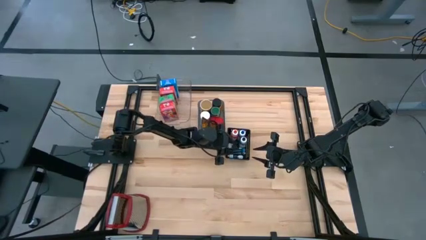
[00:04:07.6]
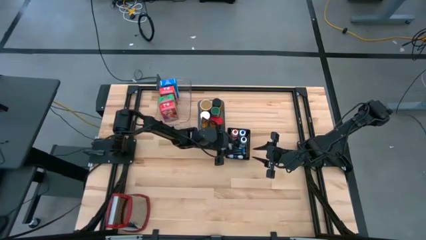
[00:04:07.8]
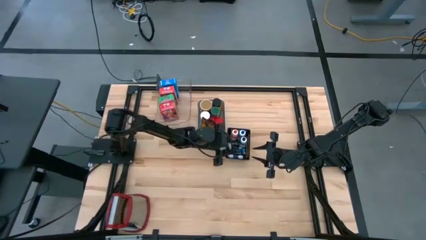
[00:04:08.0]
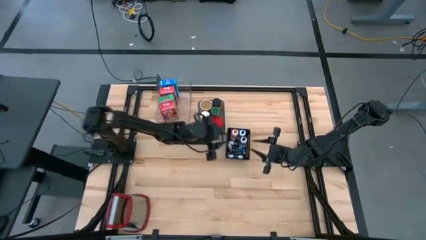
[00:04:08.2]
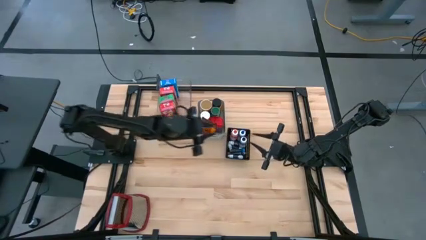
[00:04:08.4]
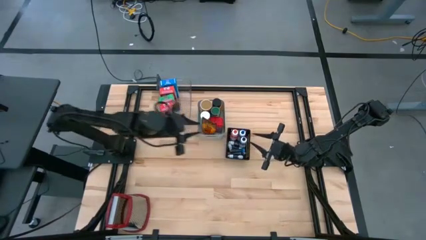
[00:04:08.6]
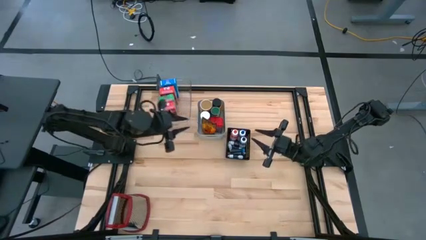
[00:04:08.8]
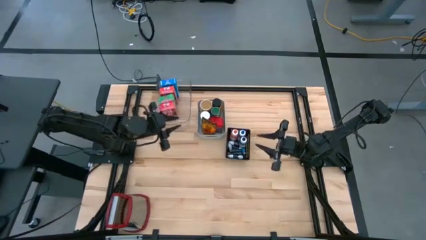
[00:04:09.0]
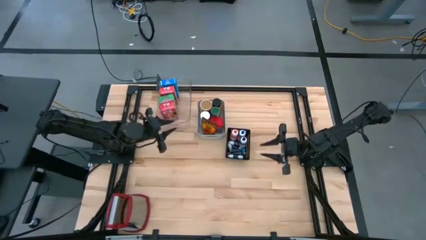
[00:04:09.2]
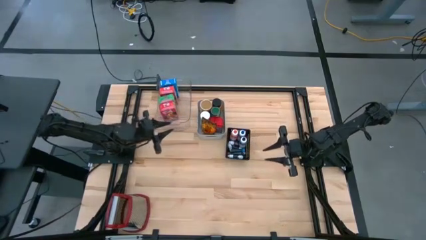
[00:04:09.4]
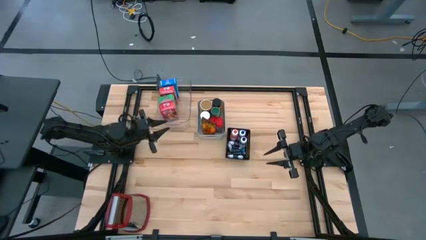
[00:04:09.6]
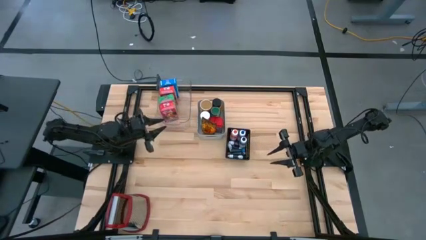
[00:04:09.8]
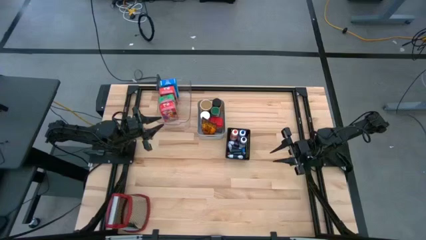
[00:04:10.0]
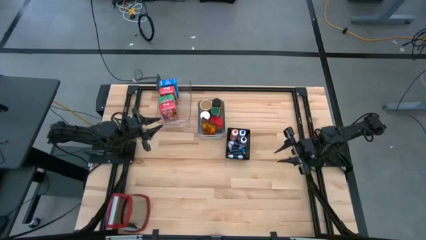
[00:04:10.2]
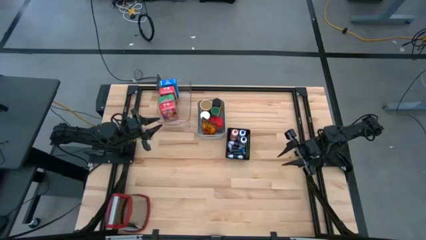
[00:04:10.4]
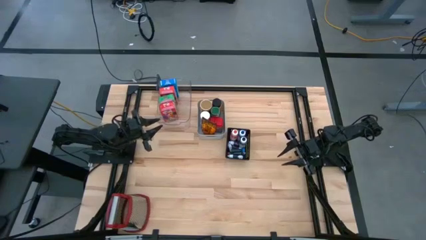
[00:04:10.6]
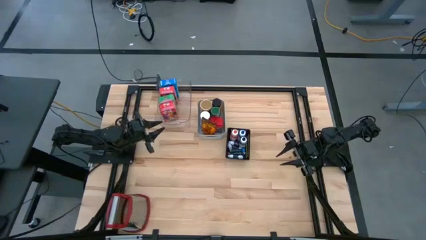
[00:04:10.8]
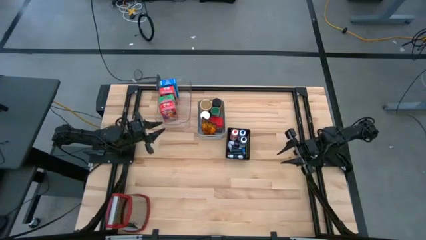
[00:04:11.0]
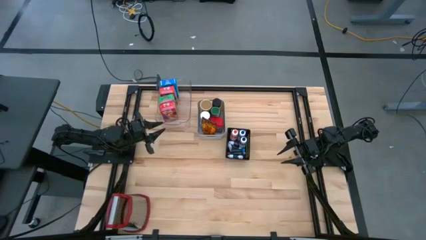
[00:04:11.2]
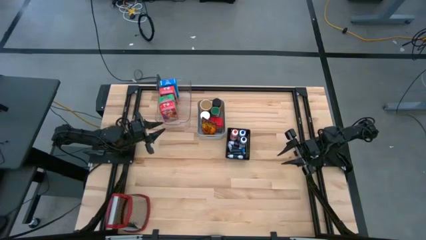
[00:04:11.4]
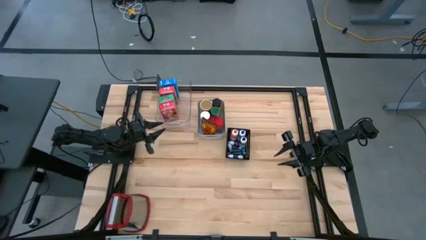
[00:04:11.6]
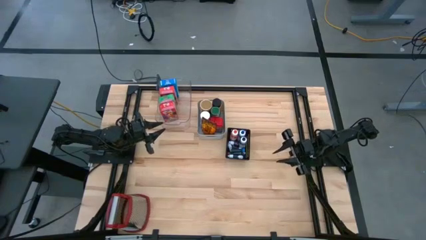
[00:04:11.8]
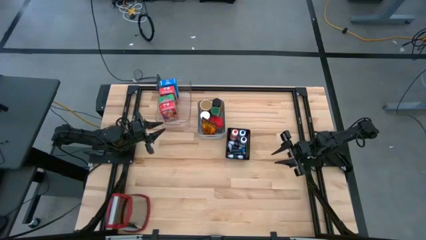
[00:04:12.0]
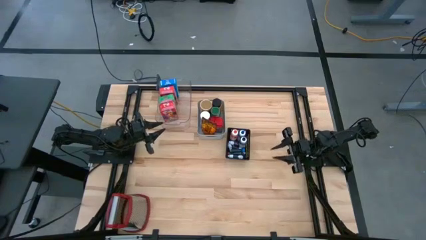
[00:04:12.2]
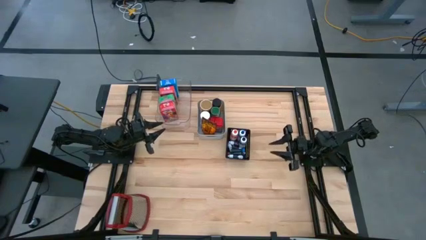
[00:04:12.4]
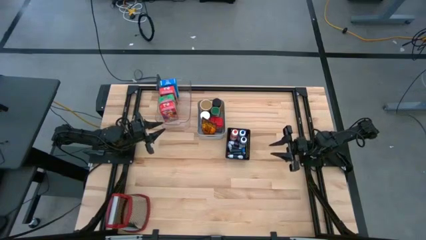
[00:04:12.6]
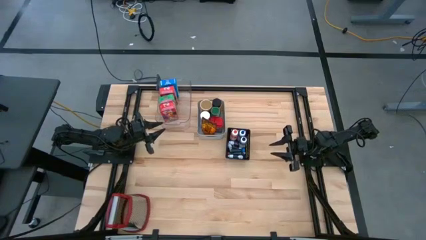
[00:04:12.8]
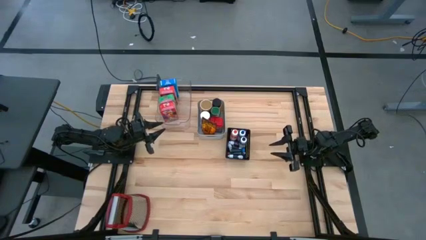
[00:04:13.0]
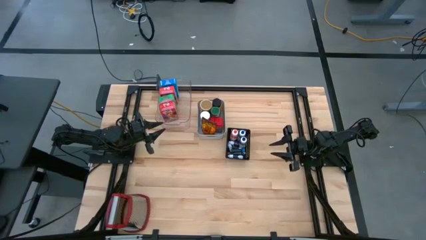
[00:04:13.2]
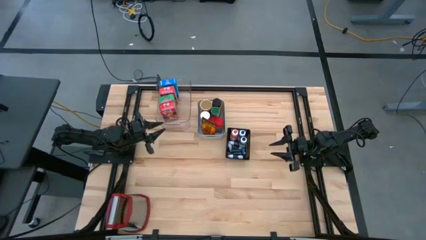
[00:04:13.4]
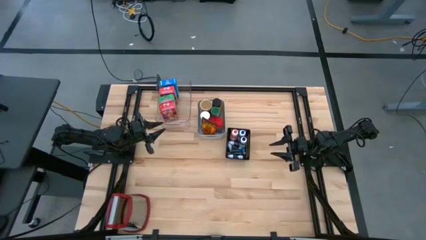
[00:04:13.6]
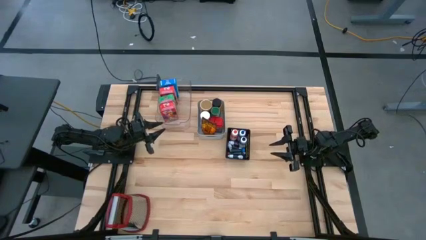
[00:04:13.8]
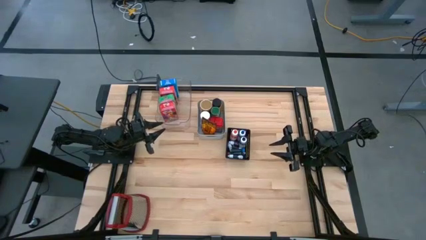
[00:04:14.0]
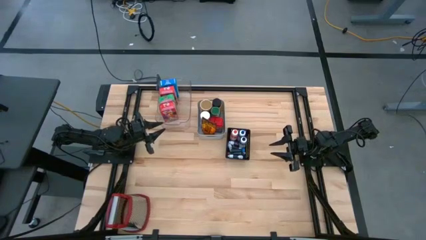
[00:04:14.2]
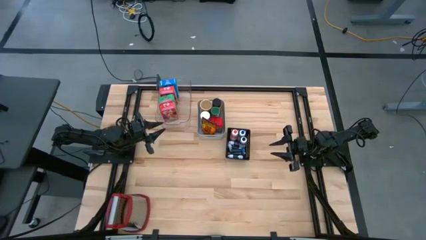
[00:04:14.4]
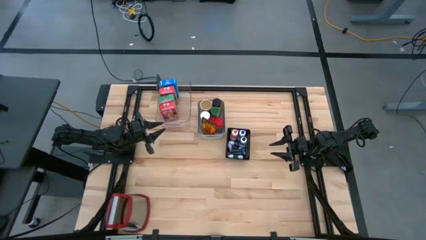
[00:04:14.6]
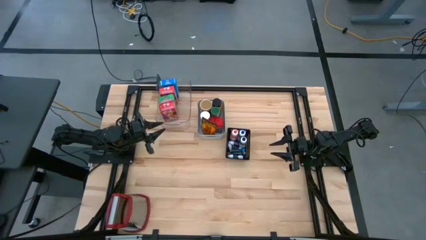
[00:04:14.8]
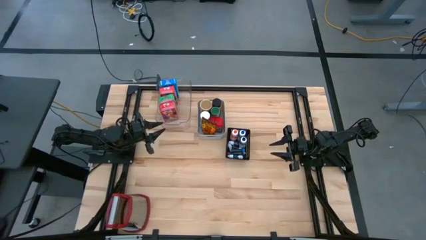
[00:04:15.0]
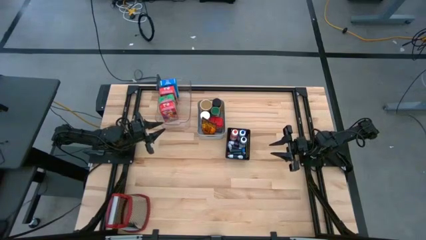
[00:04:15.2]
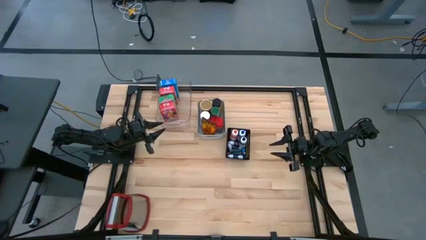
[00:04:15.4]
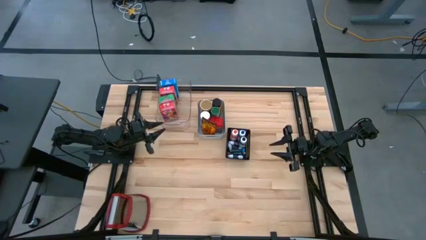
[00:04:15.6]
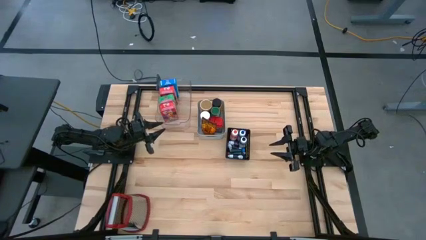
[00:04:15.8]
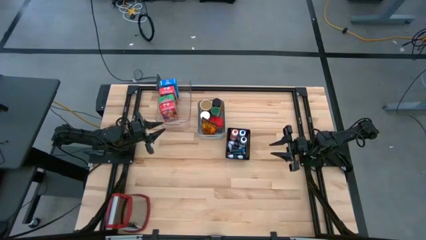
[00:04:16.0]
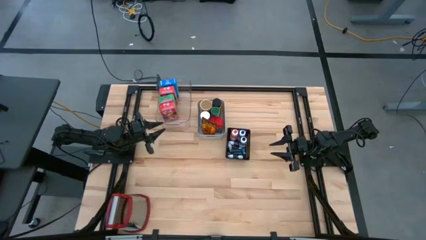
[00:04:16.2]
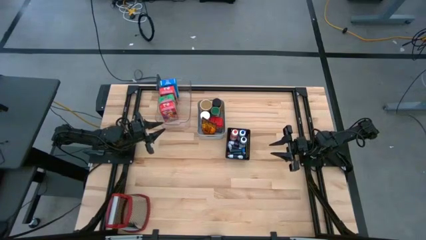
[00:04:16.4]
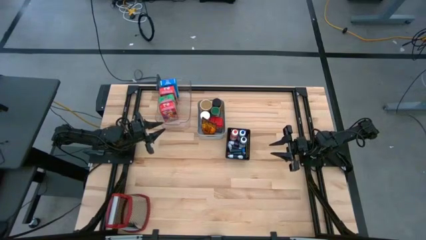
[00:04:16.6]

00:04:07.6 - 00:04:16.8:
Task: Pick & Place Kitchen Items
Return to Home Position

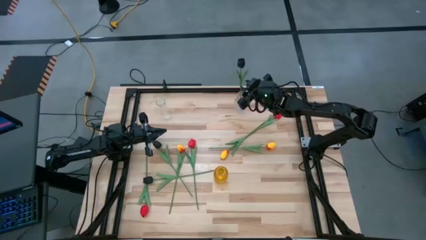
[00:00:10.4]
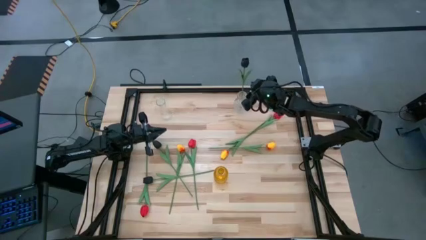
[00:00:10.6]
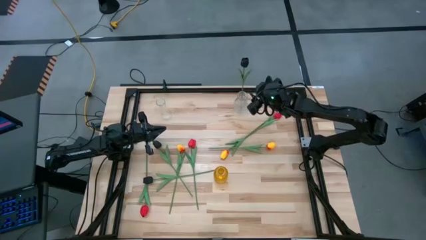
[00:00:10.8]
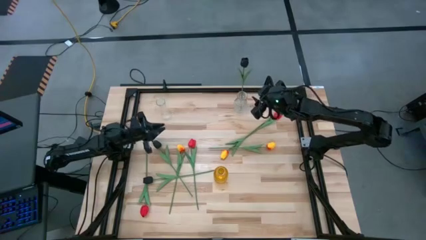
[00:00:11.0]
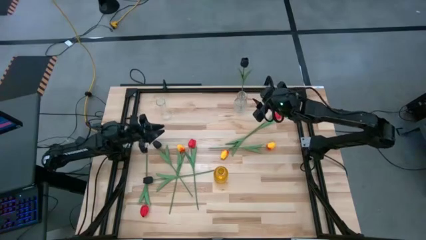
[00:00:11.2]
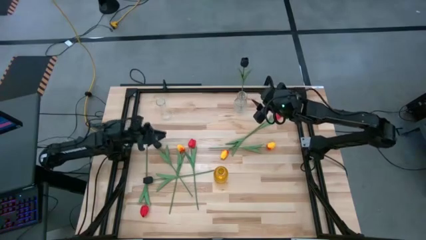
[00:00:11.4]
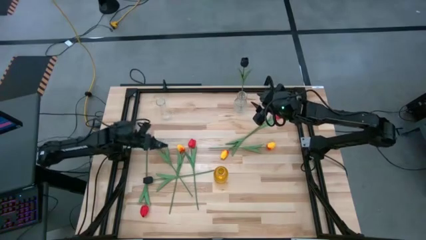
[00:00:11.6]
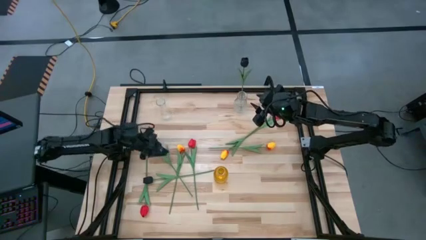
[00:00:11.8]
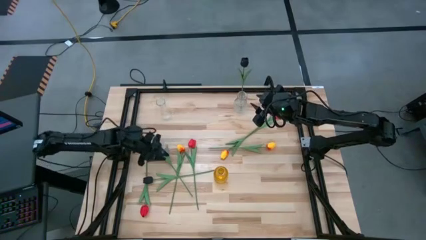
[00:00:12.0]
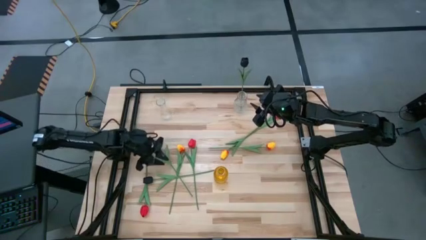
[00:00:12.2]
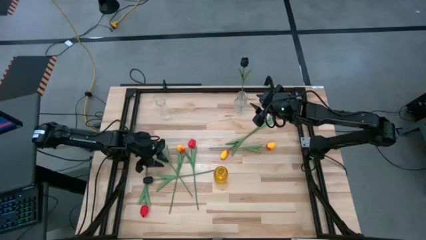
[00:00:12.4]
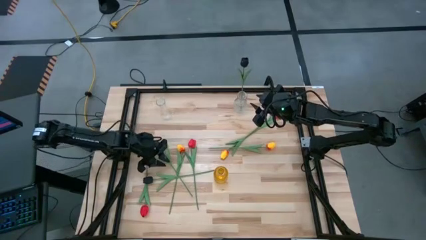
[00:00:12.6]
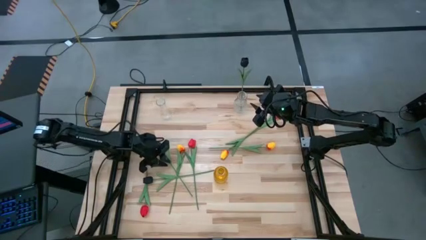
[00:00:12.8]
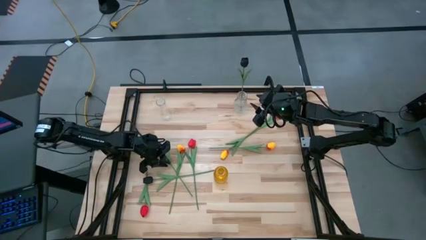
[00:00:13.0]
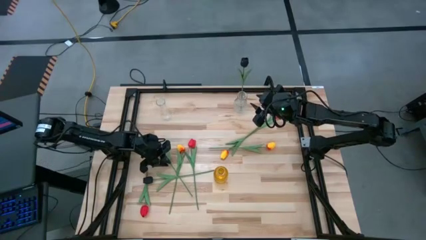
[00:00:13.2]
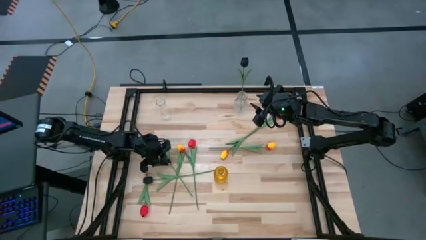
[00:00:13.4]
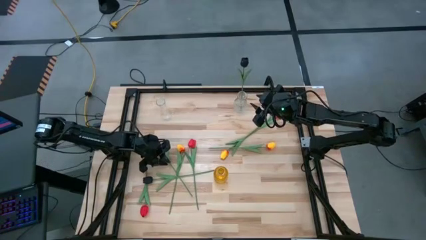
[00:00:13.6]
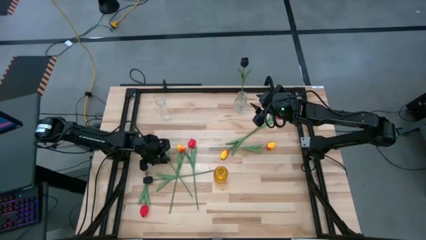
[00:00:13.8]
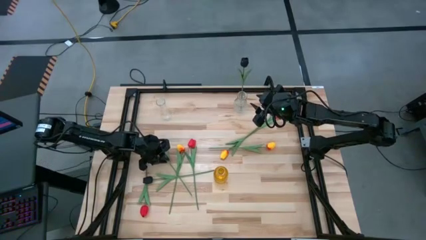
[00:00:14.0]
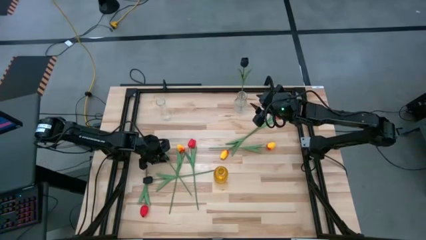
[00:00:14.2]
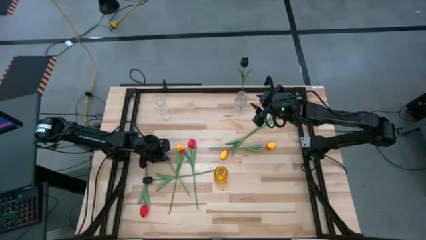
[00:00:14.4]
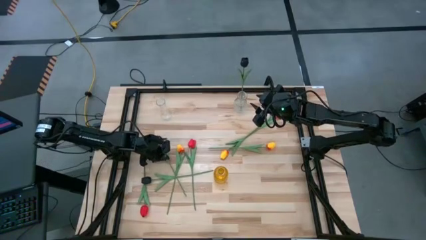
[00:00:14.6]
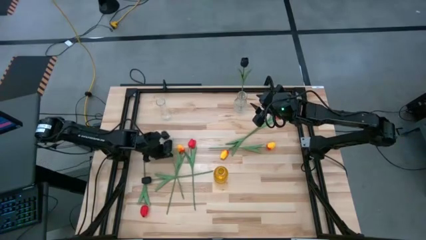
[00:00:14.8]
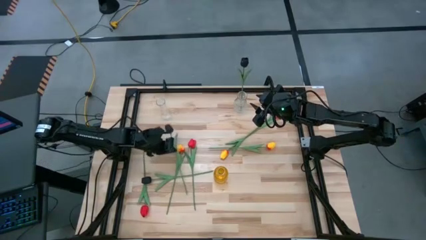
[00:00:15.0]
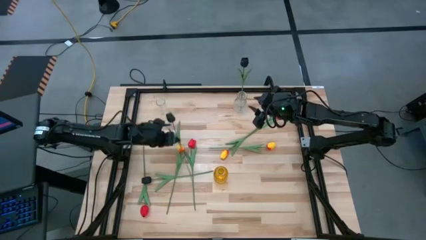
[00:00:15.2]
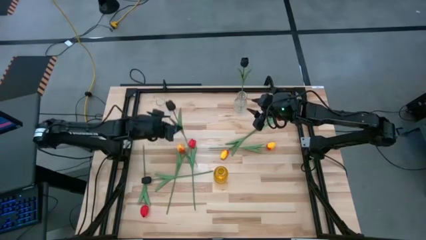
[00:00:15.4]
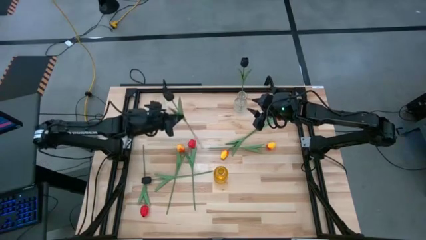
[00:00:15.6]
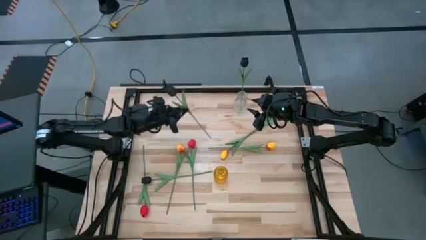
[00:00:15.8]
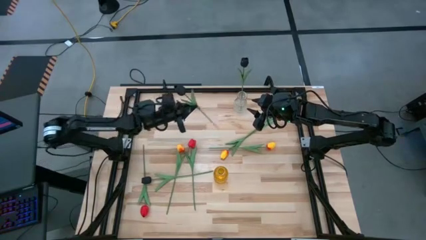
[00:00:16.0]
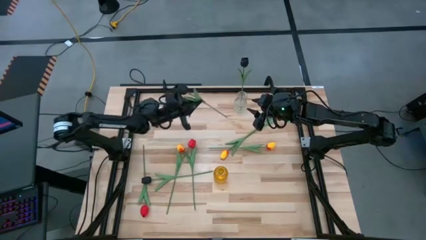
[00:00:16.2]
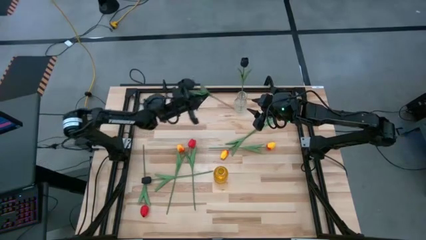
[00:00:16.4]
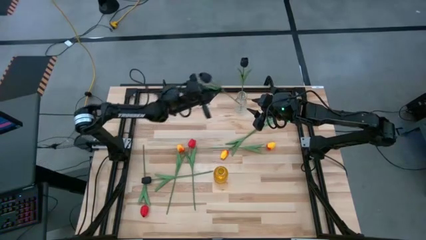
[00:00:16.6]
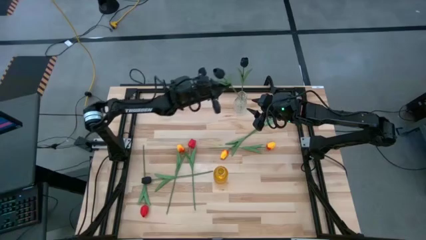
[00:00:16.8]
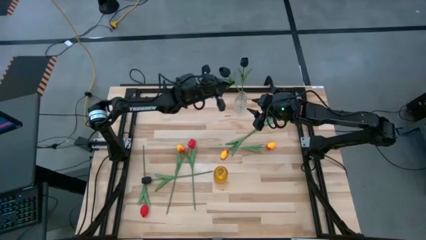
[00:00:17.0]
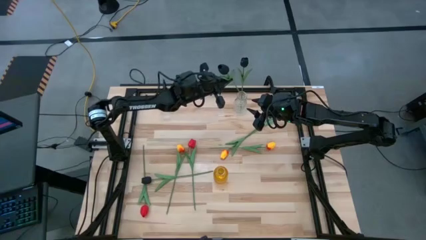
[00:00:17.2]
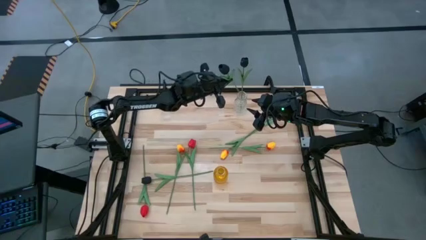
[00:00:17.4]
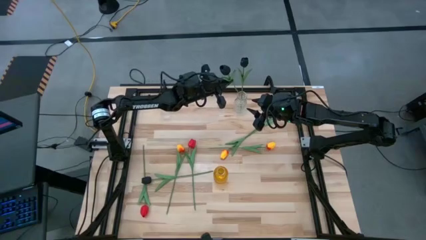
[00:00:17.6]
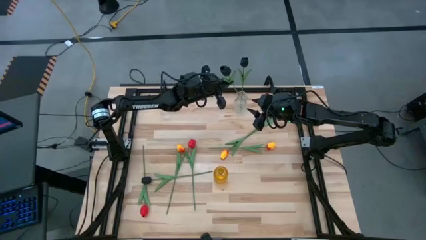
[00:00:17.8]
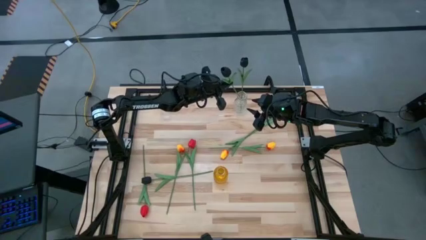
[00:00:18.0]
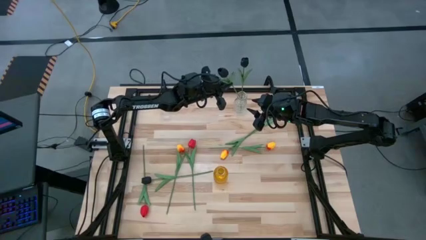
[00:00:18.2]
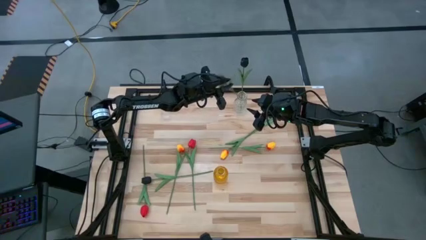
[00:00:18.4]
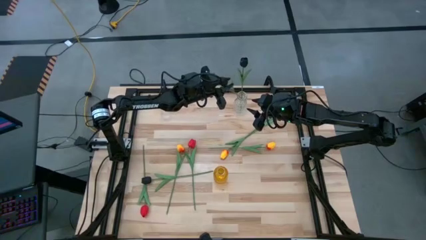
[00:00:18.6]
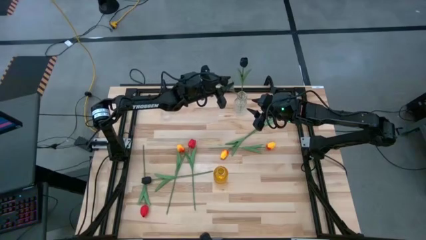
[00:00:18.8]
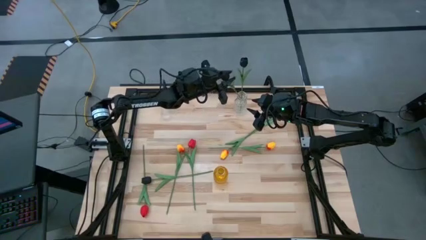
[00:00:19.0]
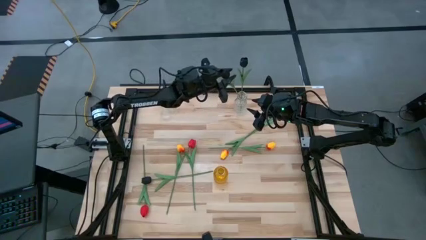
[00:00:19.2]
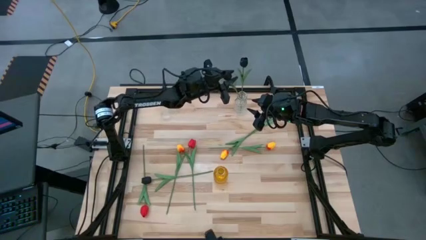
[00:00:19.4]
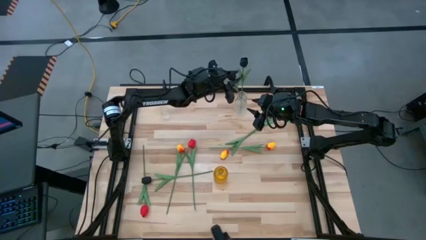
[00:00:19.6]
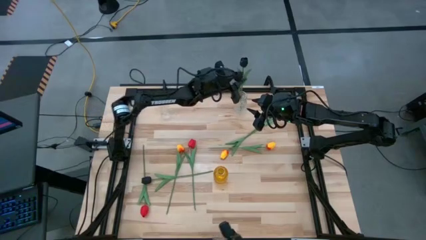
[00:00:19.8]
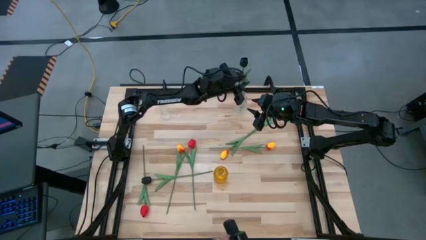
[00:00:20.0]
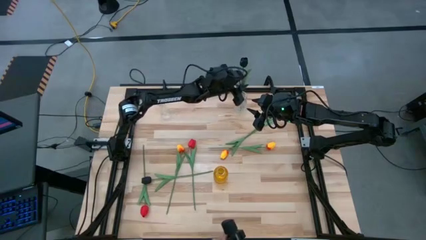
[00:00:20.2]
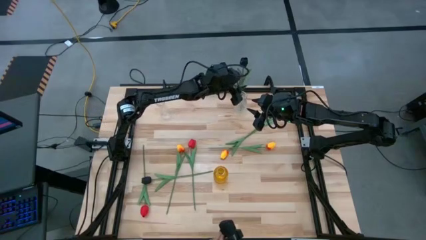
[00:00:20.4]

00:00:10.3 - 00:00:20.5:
Task: Sort flowers into vase by color
Put the top black flower into the right transparent vase
